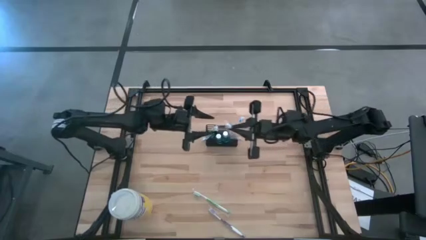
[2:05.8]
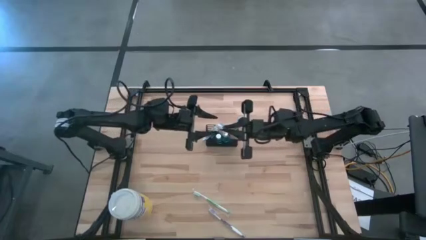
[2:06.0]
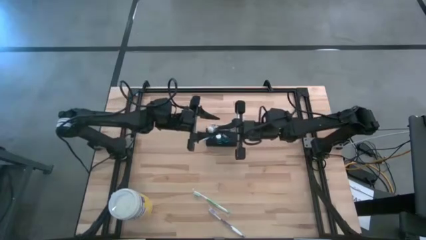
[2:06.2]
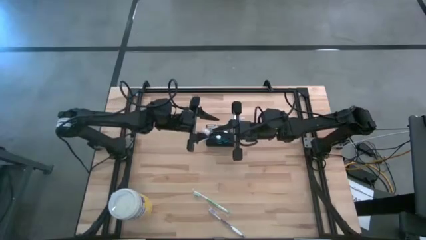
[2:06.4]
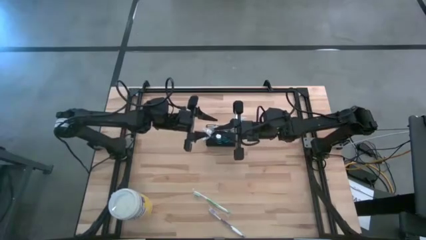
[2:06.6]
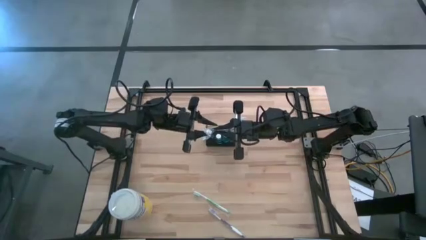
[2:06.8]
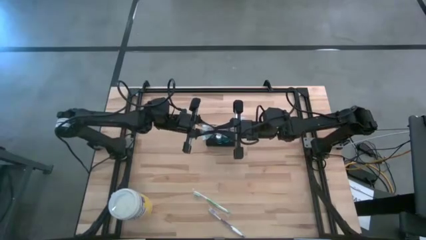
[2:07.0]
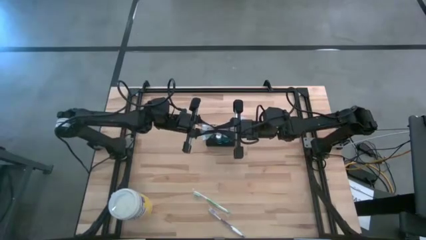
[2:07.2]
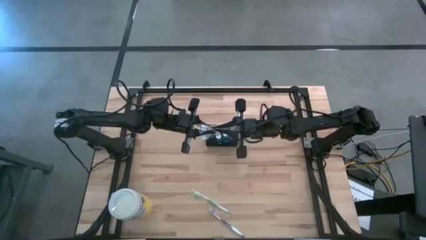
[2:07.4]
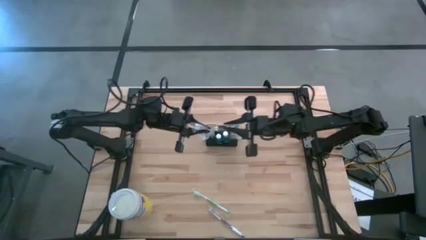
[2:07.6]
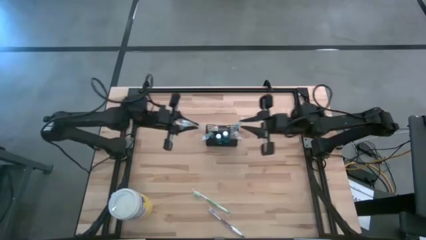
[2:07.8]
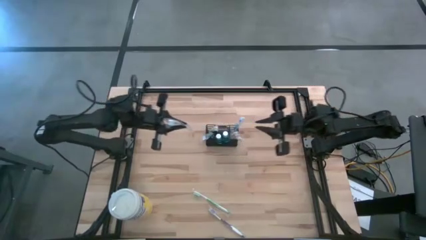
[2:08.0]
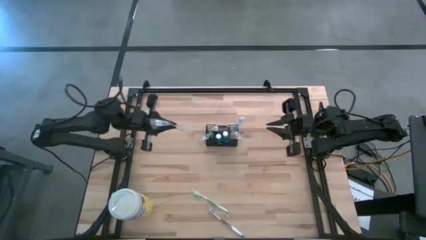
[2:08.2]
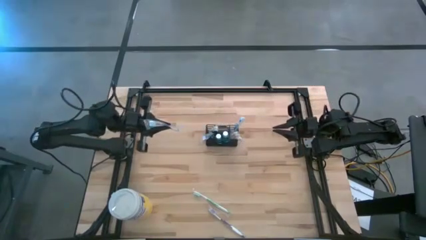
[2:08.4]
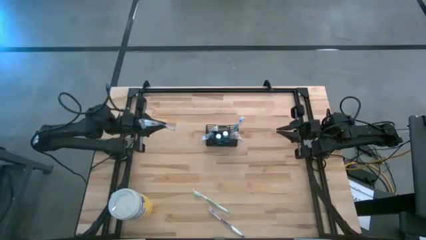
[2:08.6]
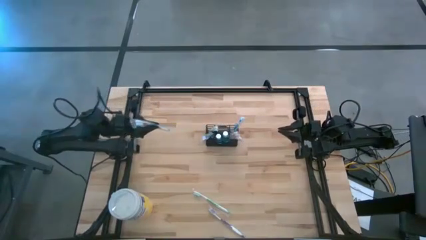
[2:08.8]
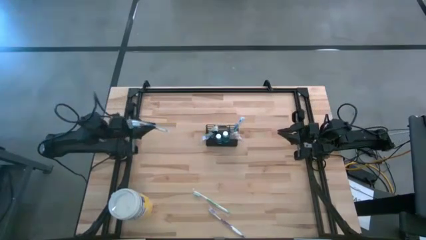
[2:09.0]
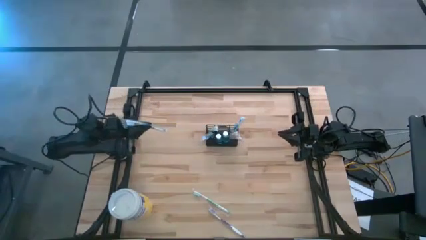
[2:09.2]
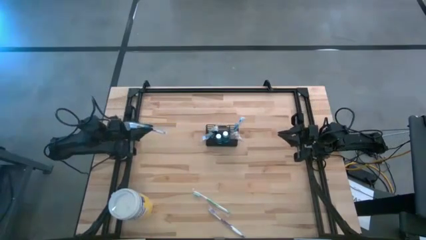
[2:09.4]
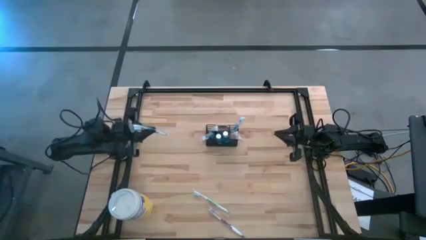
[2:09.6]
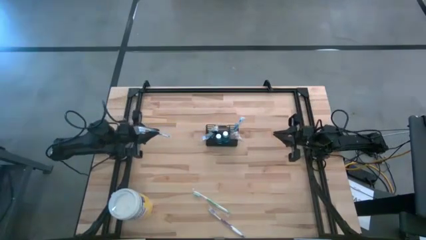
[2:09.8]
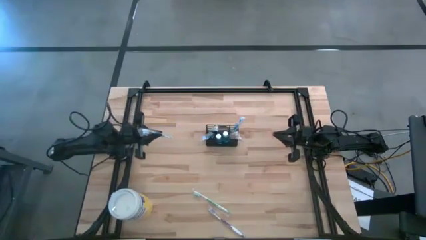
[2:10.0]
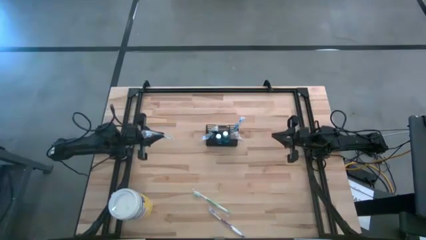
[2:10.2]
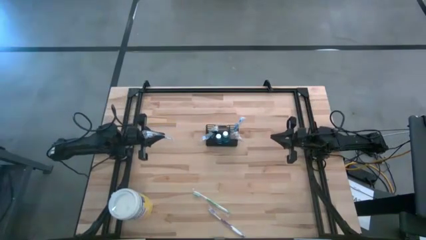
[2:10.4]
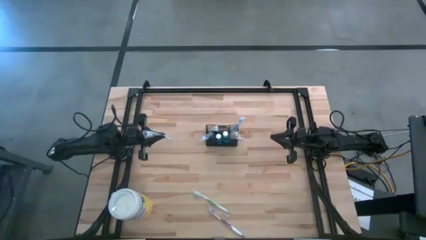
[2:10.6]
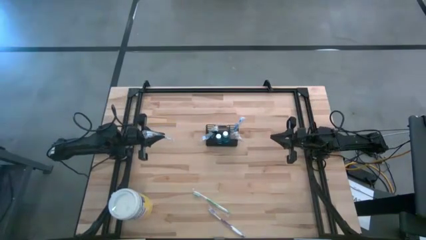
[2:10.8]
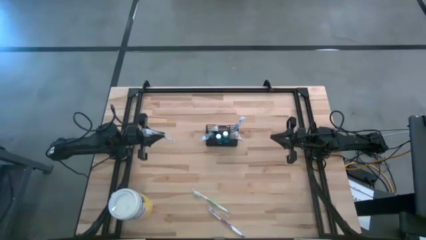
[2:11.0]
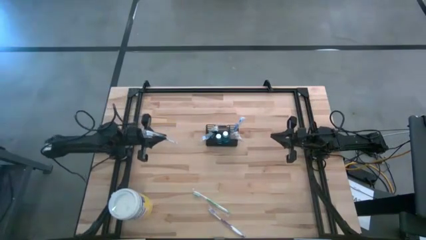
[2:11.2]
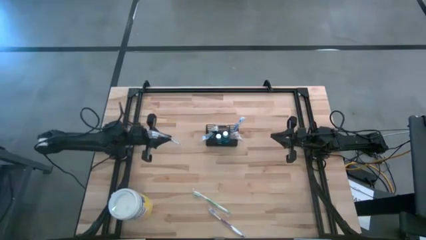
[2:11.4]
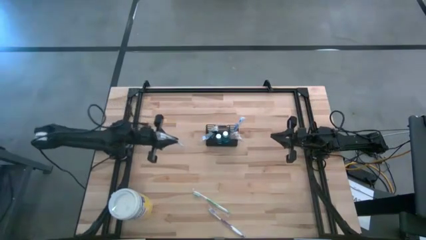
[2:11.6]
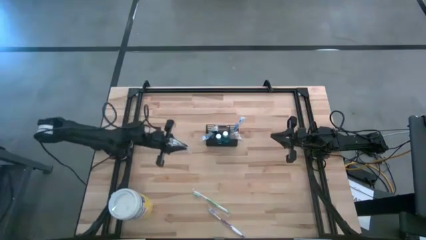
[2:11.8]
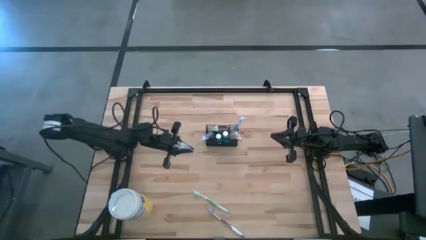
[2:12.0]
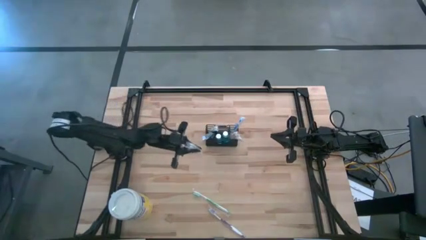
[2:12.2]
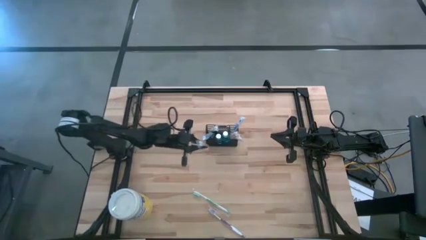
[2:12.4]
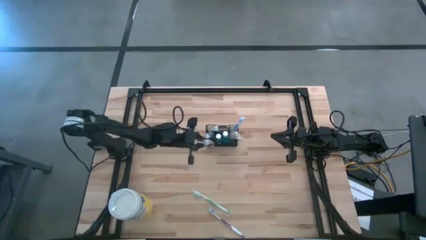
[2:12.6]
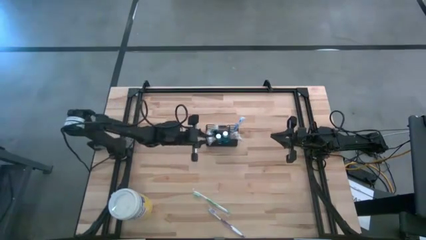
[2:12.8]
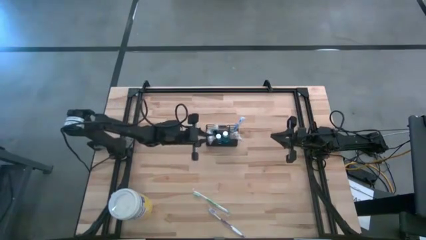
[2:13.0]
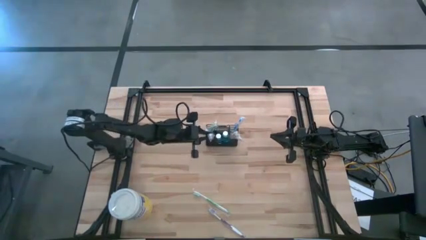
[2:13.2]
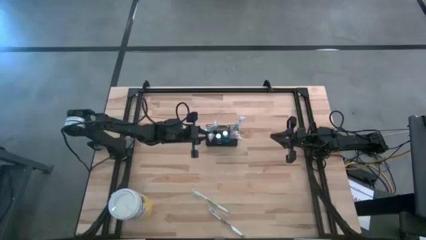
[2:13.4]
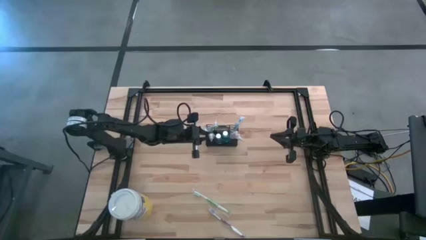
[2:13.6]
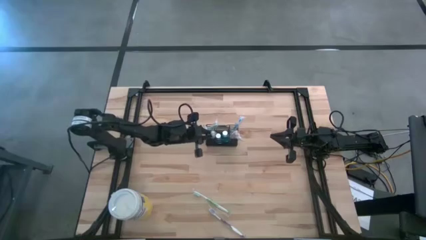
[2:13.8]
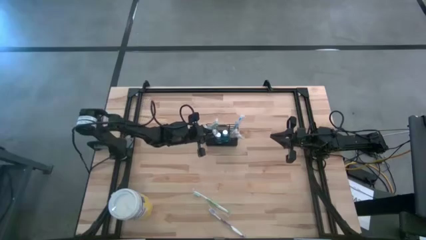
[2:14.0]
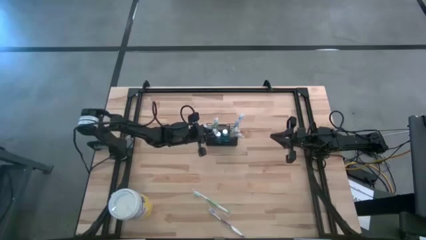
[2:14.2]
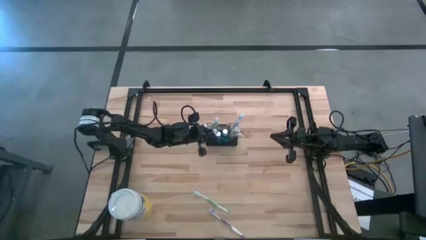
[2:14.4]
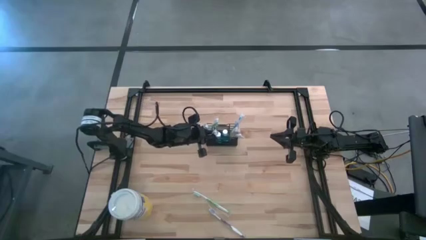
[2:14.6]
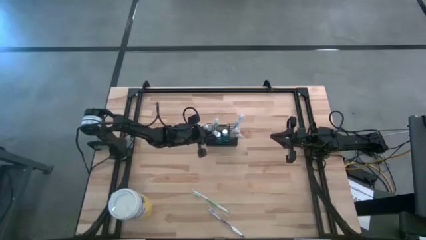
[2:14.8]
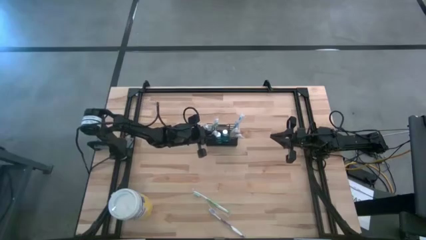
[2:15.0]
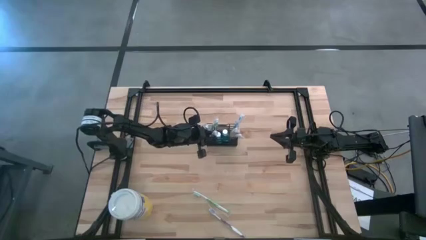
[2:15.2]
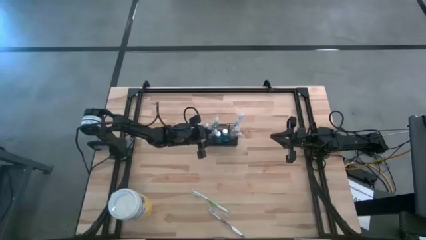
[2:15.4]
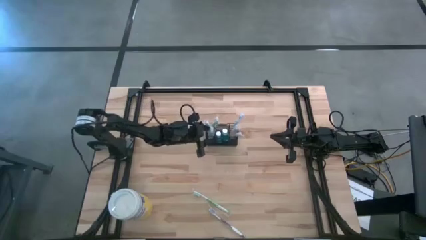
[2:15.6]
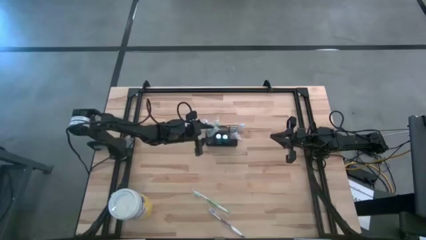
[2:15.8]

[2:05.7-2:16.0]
Task: Pick & Place toothbrushing station
Put the blue toothbrush into the wire organizer

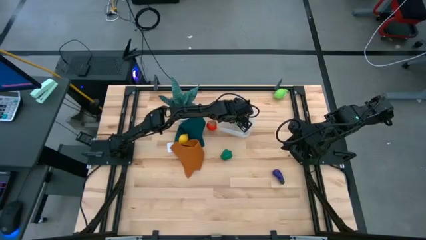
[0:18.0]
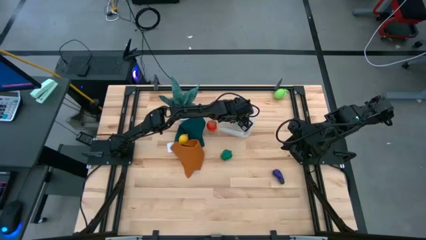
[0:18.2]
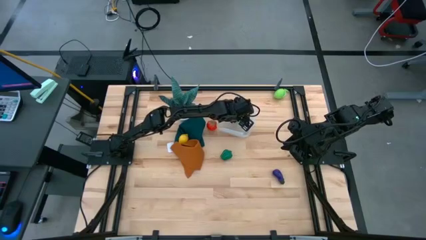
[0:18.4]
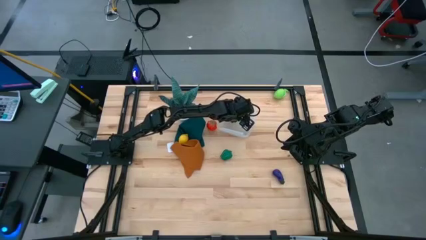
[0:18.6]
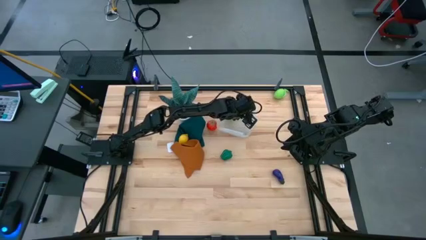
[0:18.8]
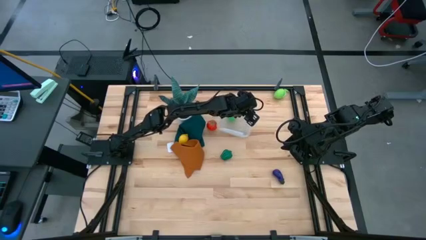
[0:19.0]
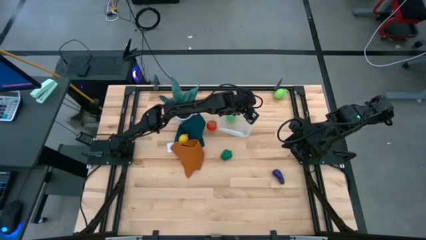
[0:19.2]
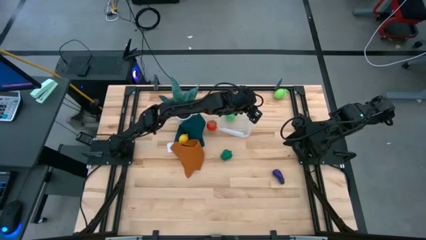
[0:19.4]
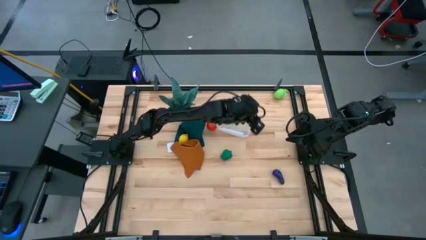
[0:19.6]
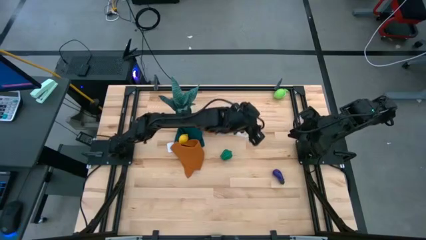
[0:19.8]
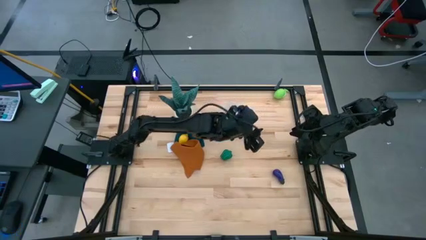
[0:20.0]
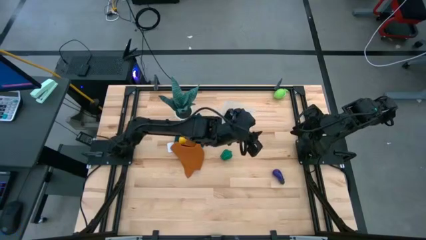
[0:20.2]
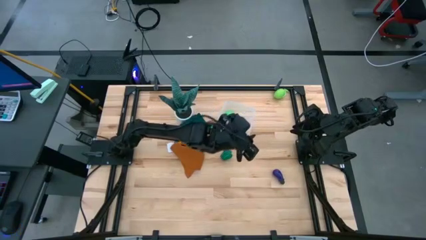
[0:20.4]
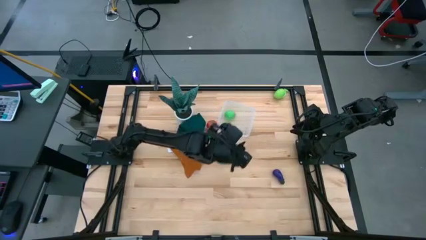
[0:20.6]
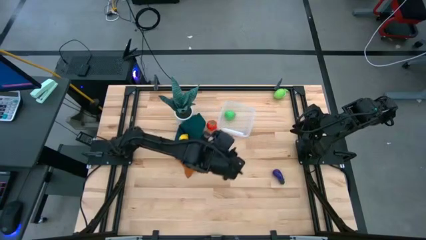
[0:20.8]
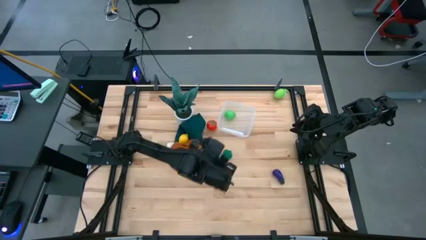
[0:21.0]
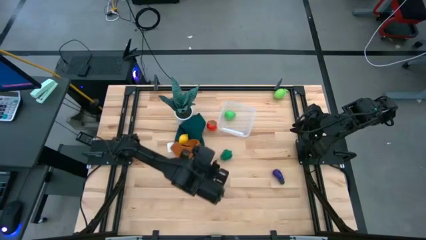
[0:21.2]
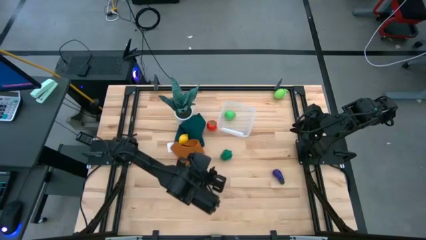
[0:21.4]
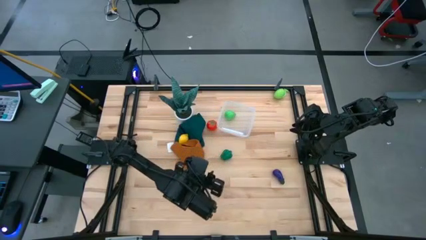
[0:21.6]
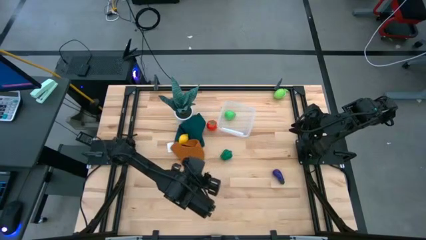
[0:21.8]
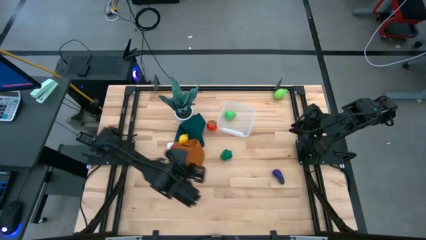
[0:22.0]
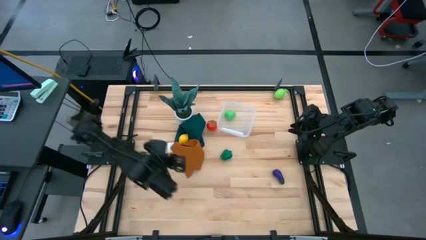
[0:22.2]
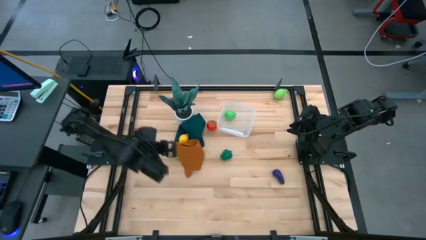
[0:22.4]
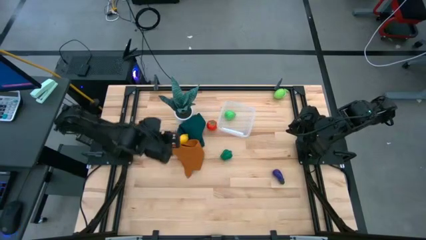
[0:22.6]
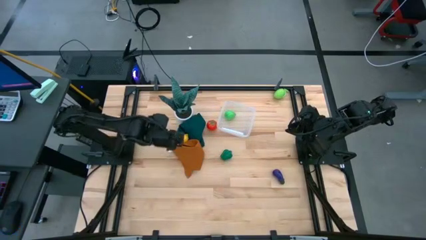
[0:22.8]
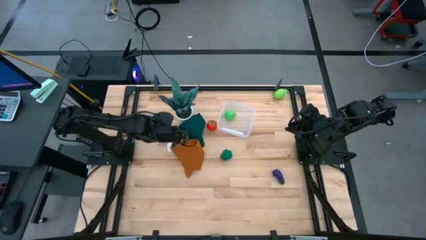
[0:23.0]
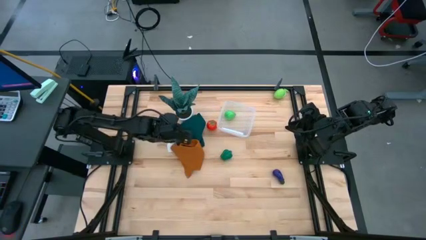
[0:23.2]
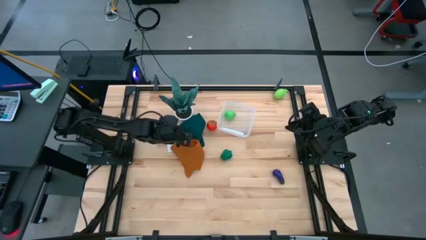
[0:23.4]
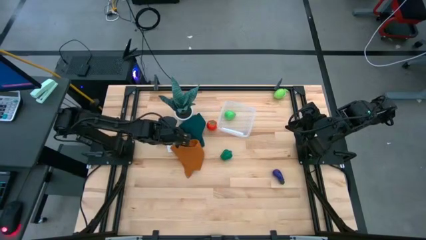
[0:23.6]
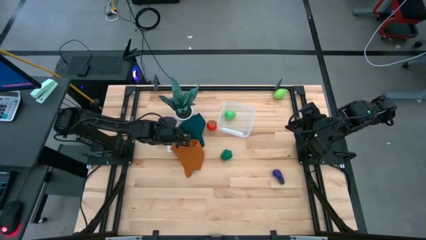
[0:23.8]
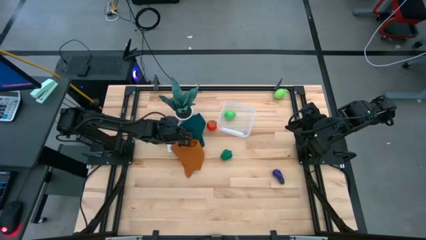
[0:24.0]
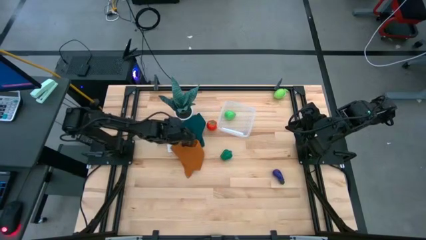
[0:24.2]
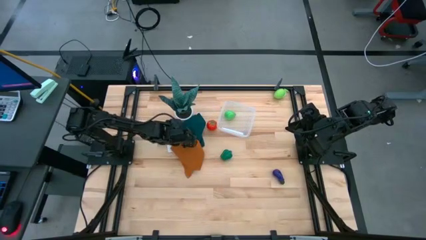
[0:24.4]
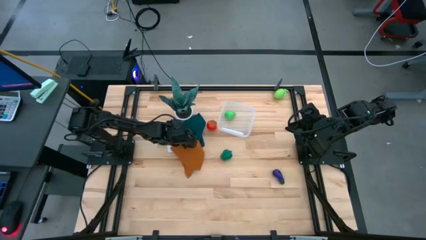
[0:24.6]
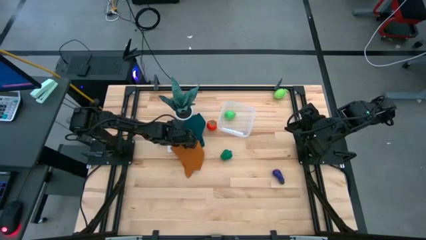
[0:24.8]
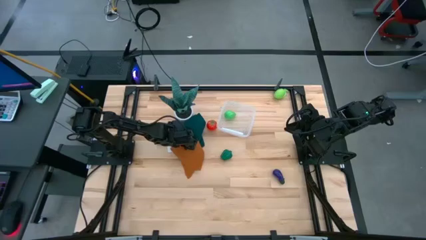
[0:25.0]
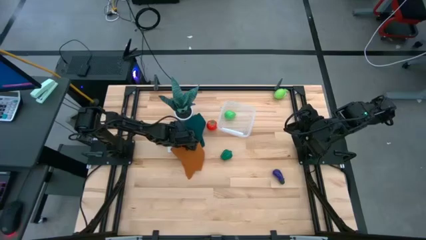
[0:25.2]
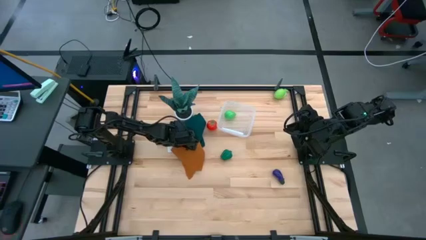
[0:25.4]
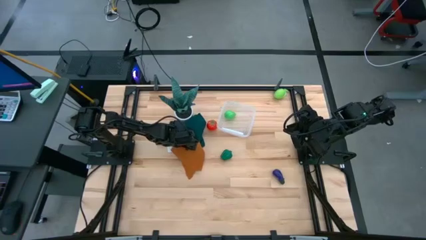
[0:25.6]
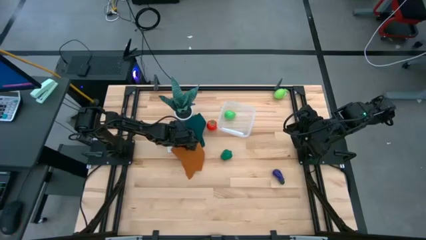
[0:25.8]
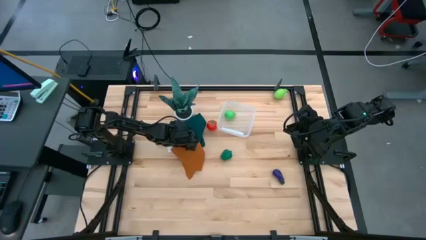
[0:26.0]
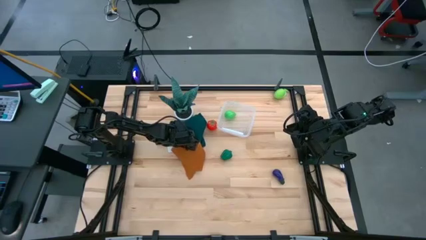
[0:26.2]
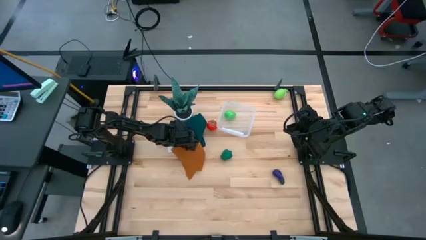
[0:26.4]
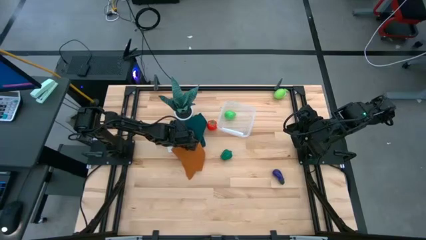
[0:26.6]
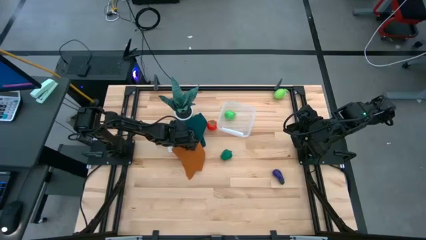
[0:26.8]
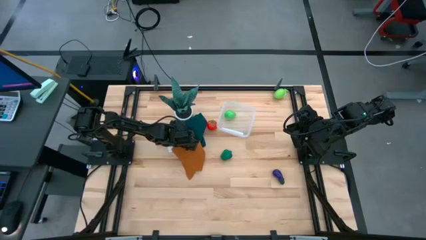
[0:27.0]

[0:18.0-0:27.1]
Task: Pick and placing Produce into tupperware
Put the yellow lemon into the transparent bin
